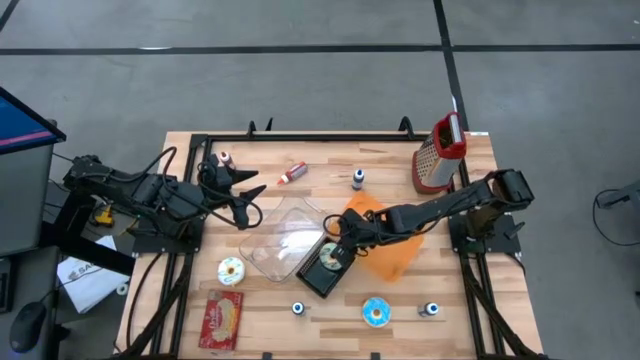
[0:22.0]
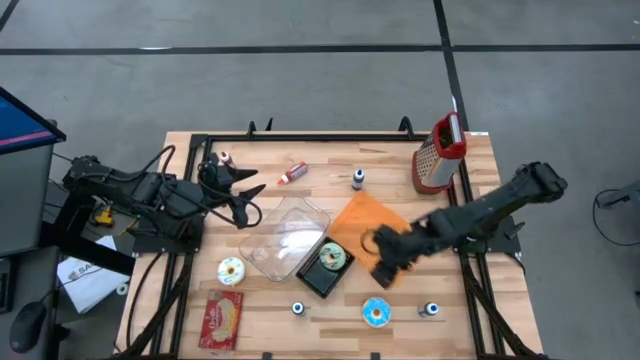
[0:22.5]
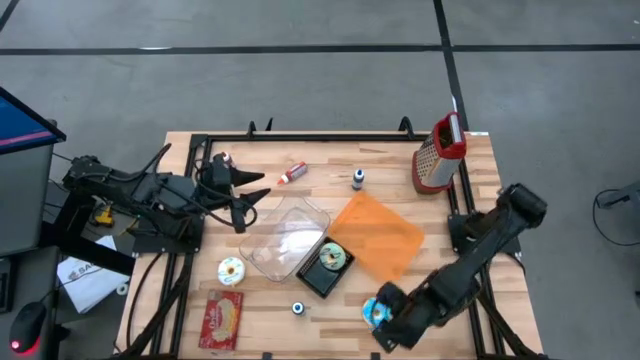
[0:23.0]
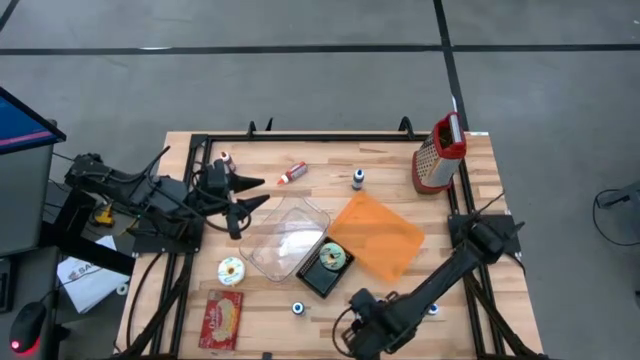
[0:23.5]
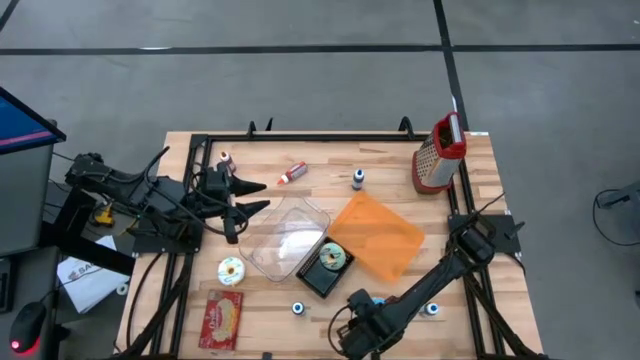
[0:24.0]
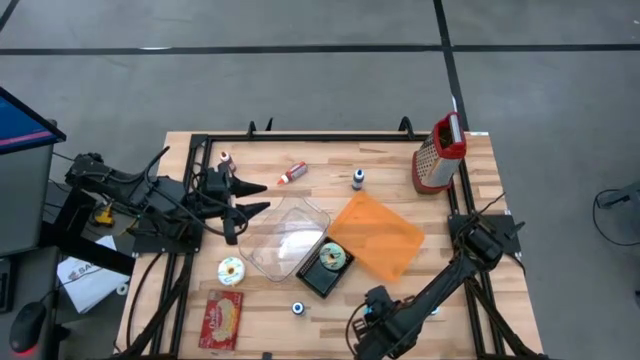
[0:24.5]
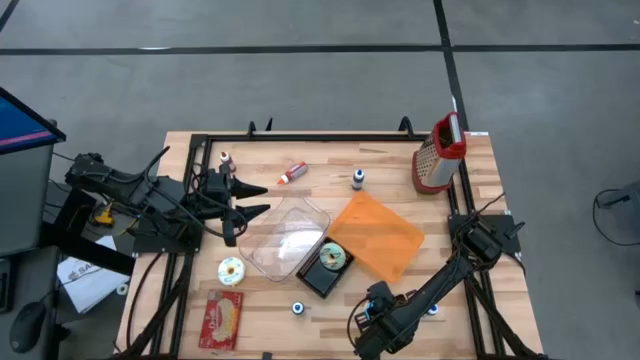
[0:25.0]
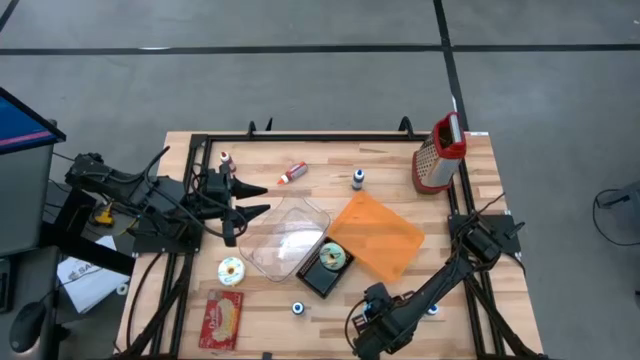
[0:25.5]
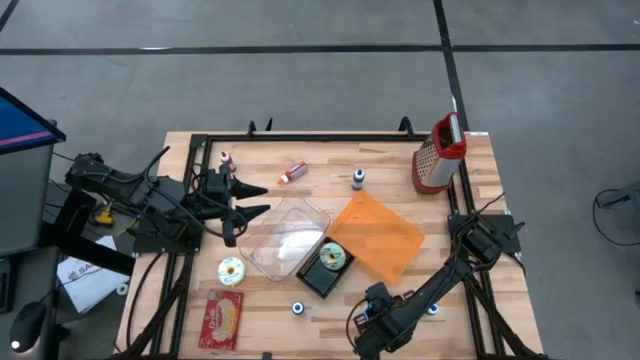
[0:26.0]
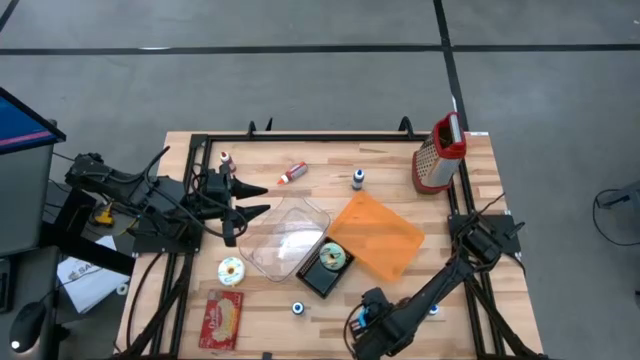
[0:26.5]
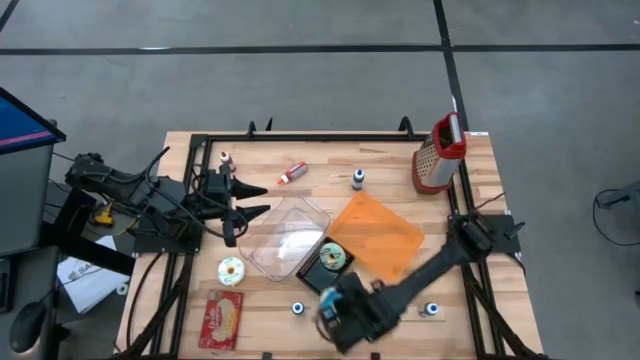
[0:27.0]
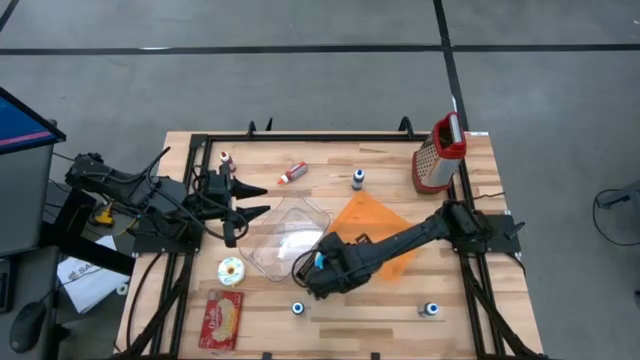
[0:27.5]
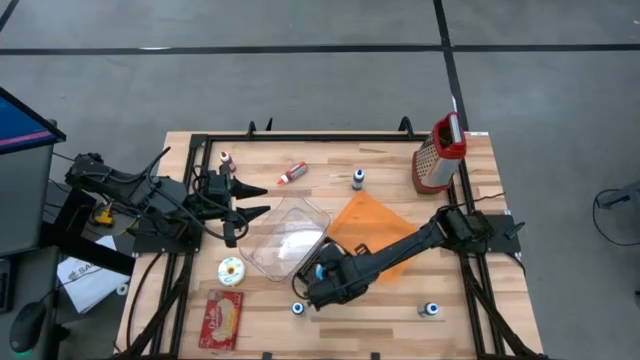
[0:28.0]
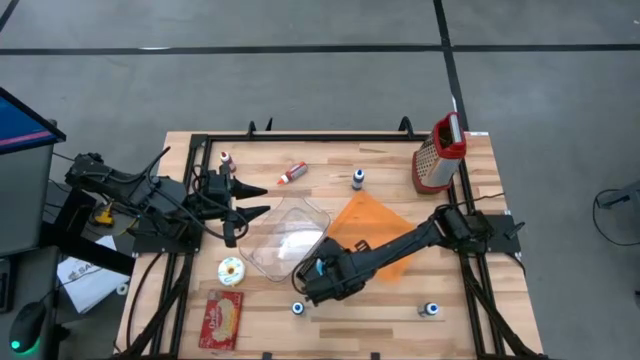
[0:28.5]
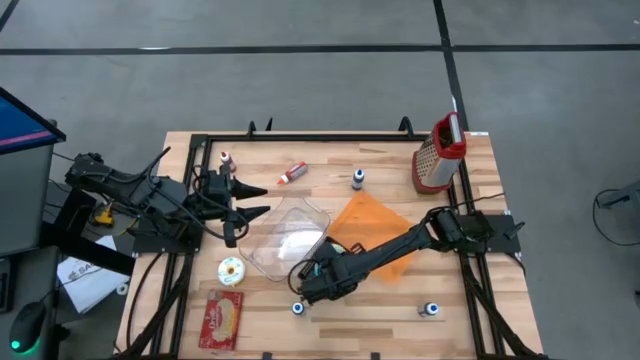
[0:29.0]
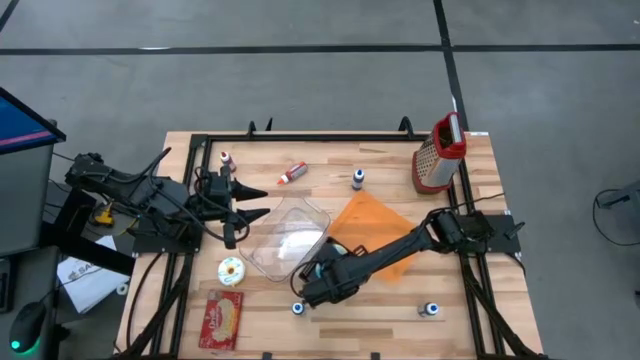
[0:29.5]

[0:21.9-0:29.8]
Put the blue donut into the black bin

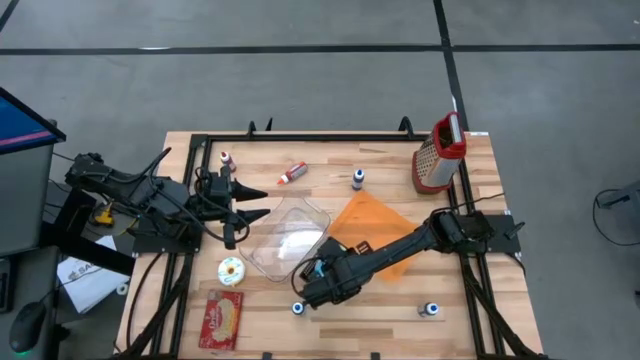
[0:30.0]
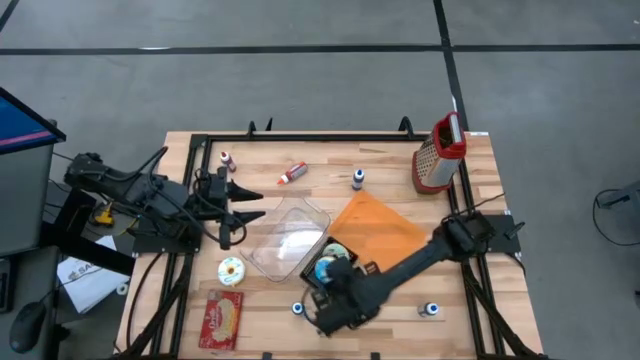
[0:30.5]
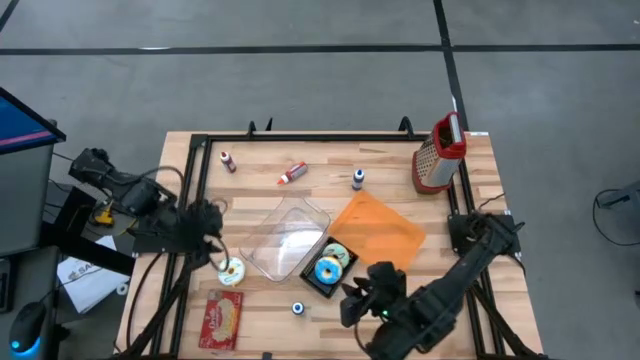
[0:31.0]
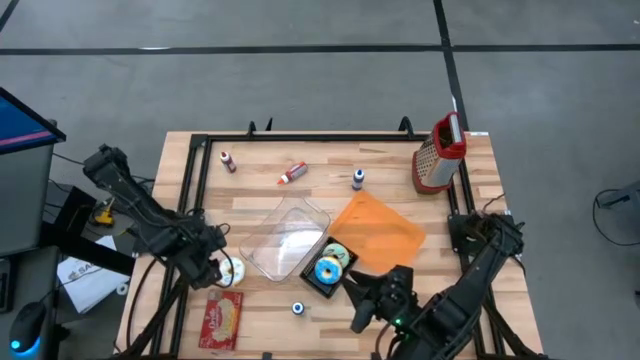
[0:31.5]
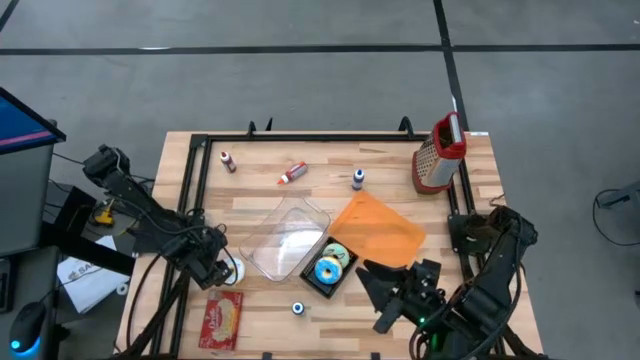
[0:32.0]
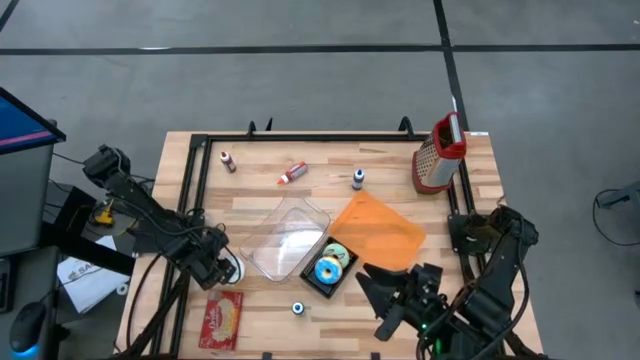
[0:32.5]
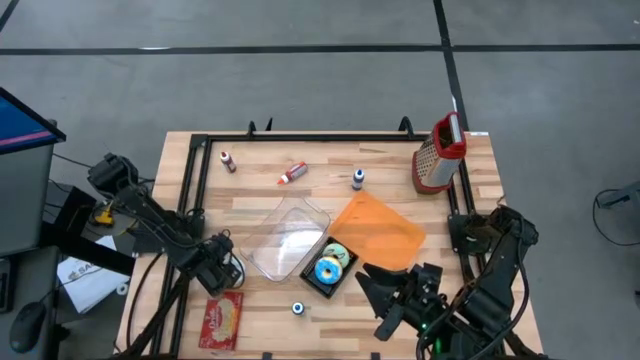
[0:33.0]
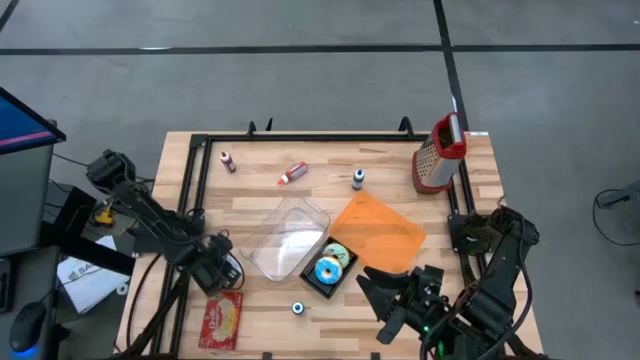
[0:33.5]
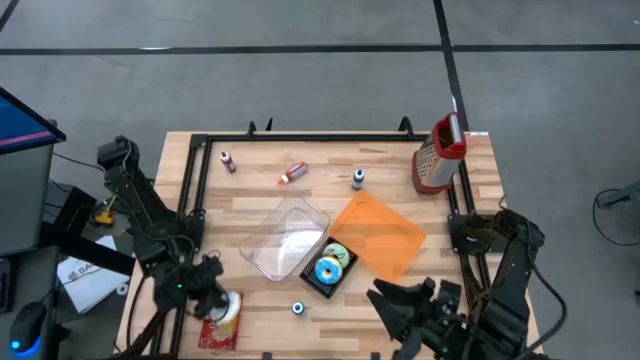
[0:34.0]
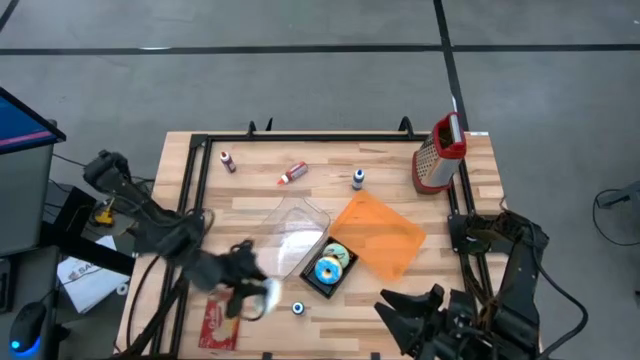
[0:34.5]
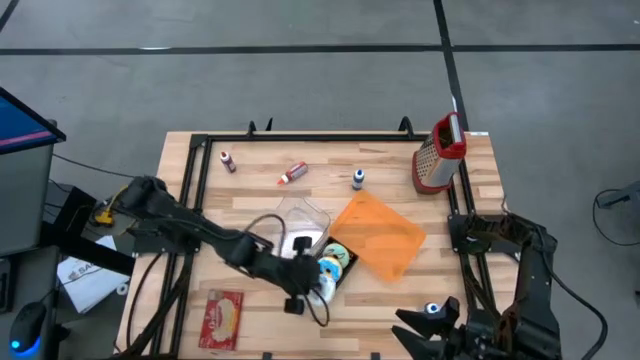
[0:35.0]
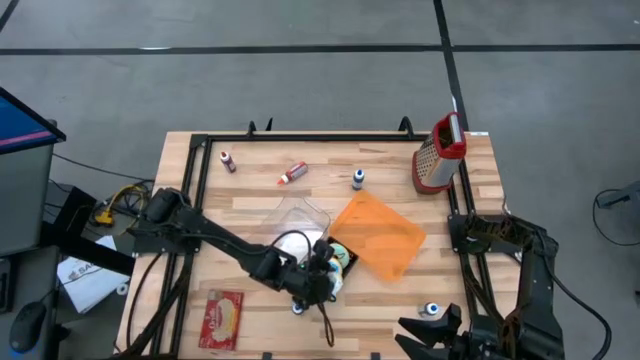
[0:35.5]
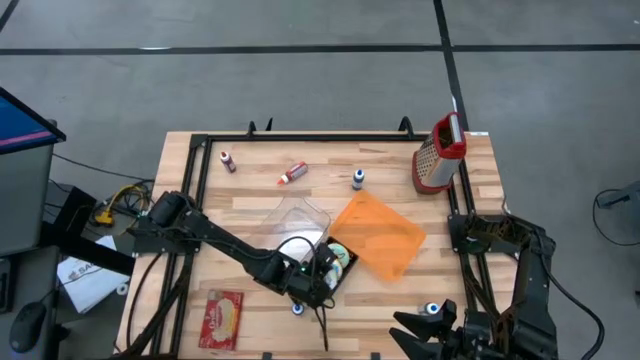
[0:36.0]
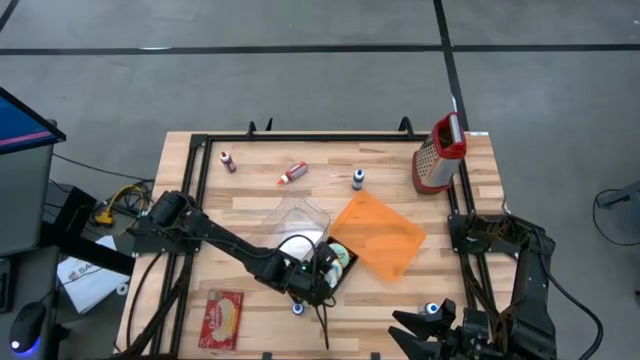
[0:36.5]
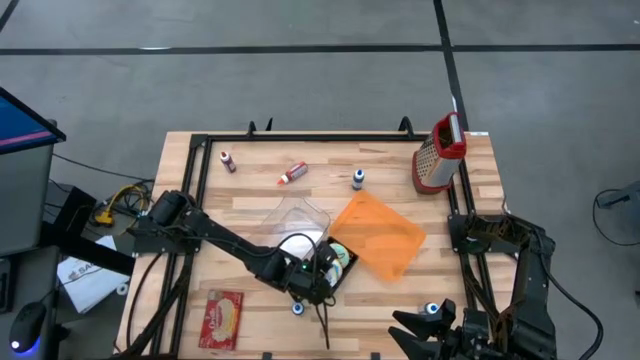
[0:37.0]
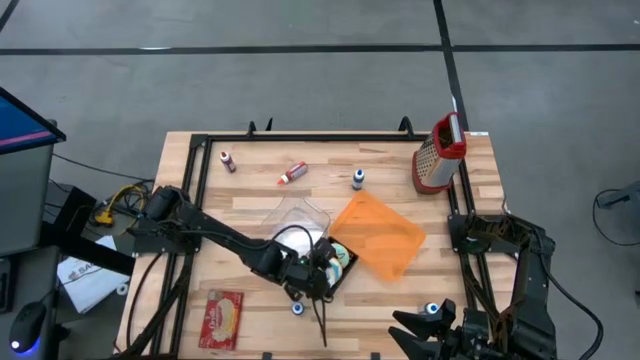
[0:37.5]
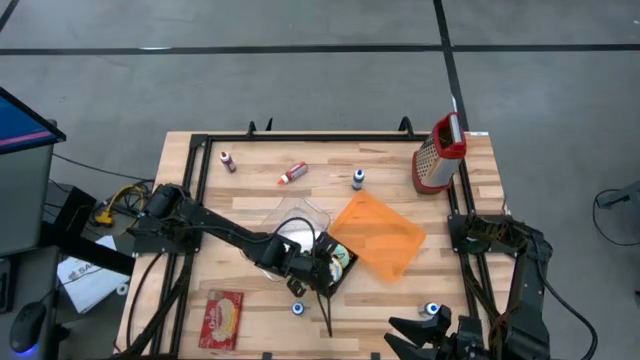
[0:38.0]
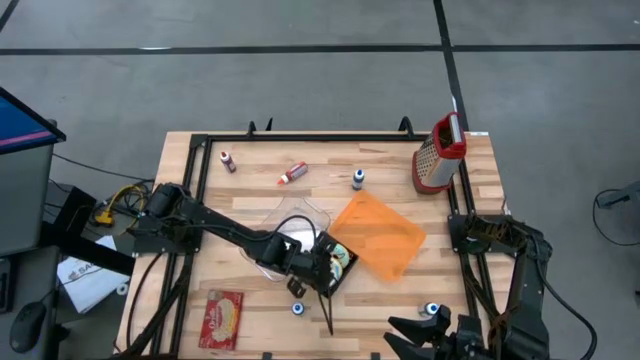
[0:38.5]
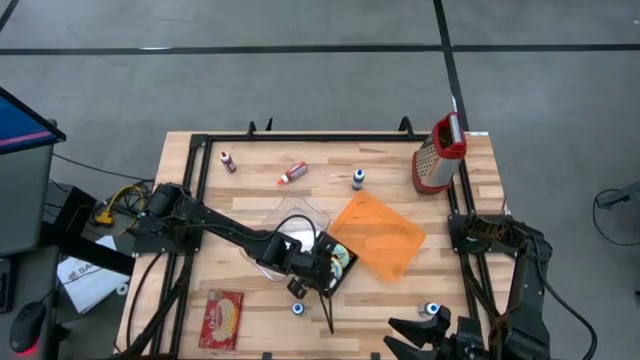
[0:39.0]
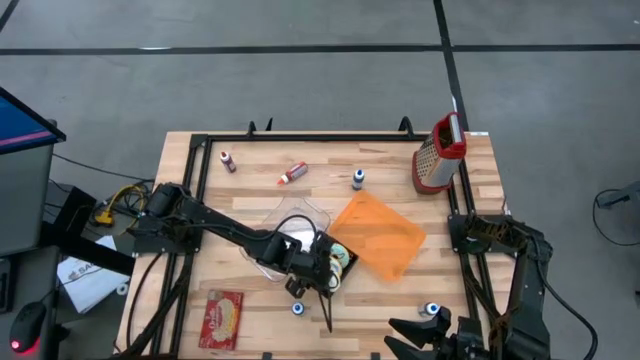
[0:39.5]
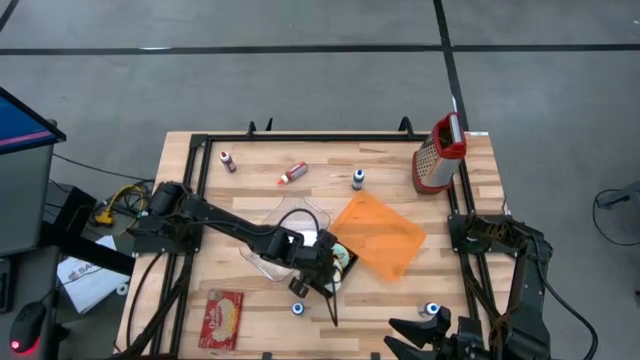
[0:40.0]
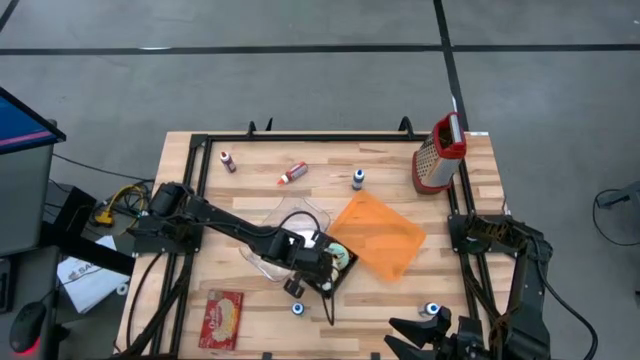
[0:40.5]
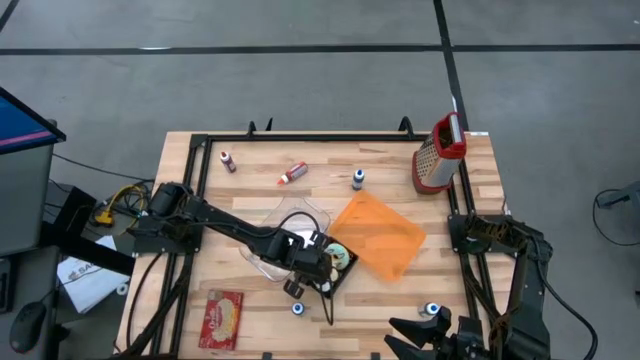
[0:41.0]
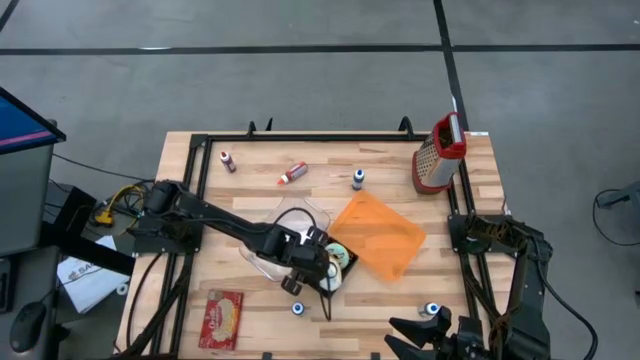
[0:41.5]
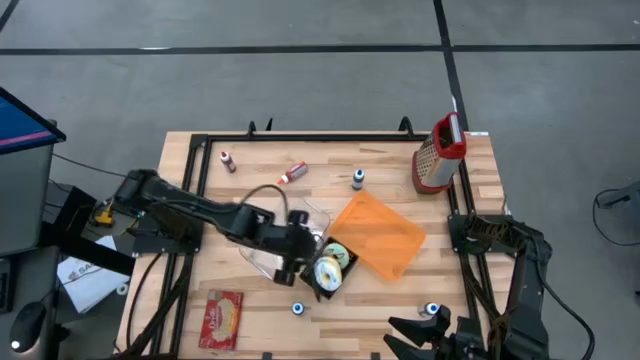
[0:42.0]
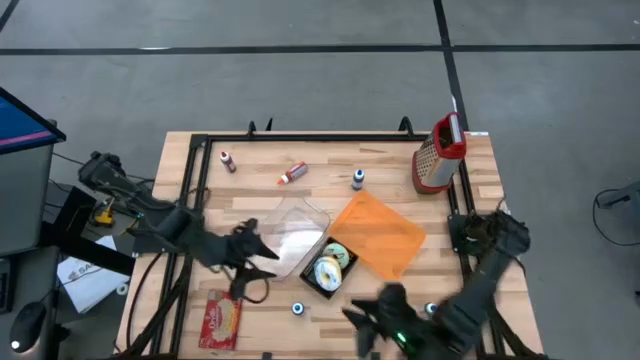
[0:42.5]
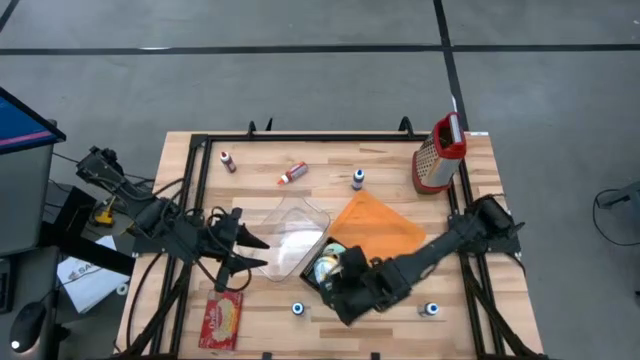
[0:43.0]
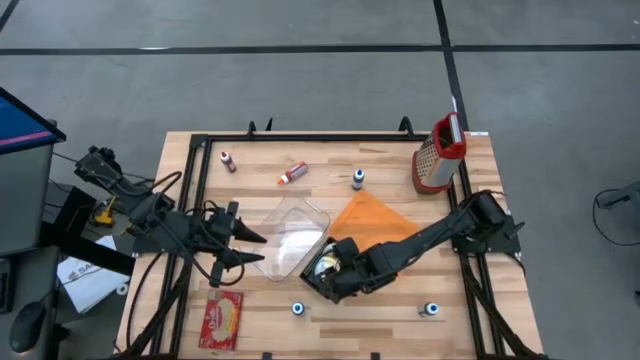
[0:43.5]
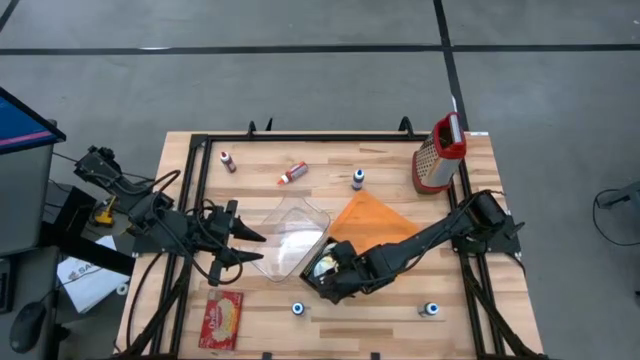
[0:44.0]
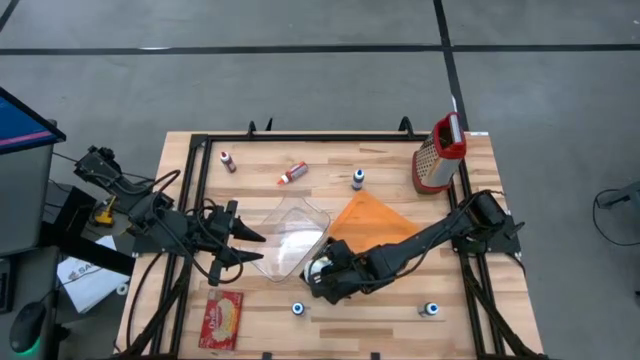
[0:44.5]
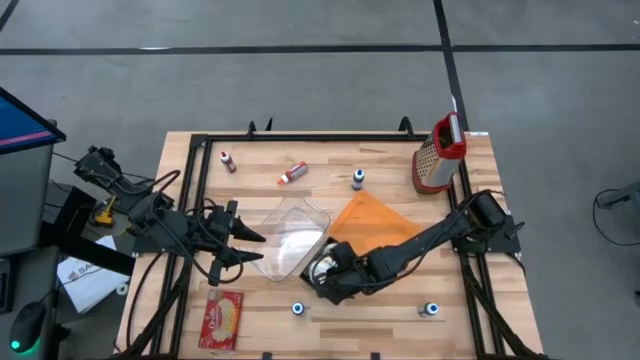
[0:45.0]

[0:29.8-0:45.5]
Put the white donut into the black bin
